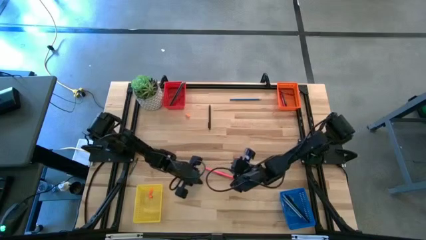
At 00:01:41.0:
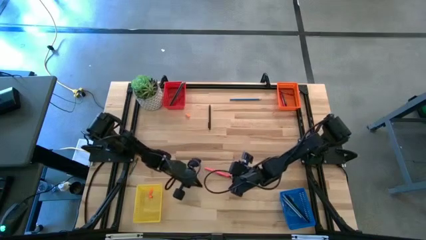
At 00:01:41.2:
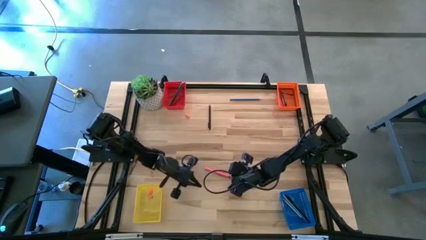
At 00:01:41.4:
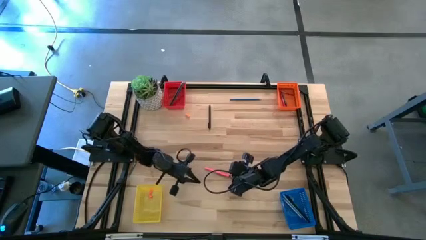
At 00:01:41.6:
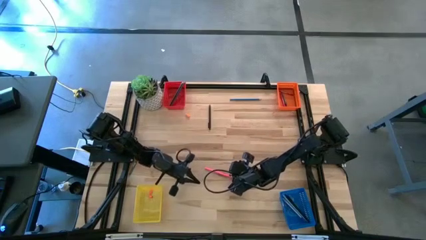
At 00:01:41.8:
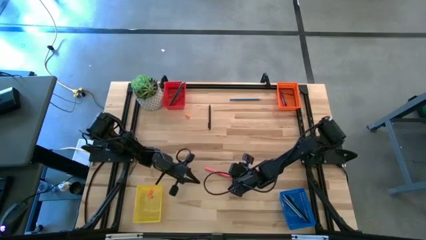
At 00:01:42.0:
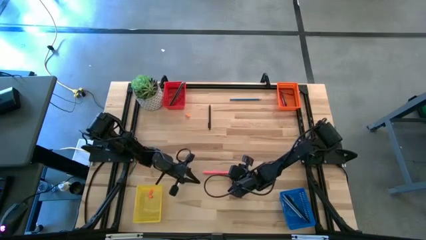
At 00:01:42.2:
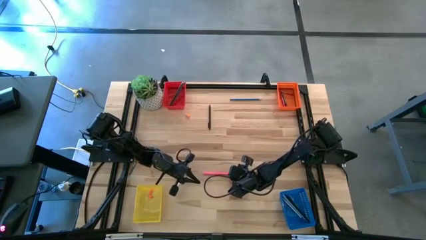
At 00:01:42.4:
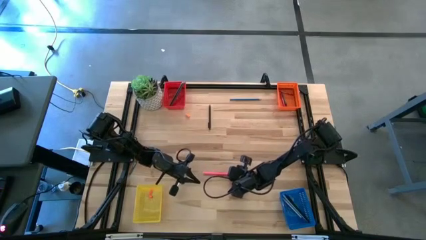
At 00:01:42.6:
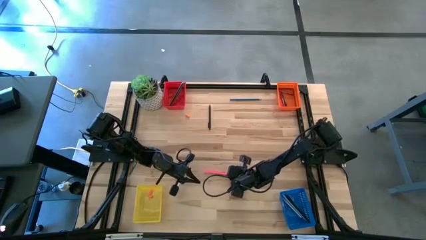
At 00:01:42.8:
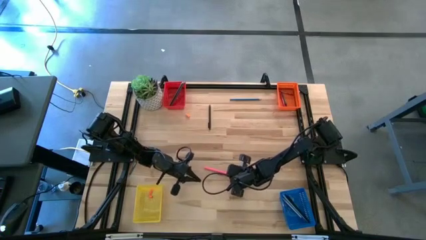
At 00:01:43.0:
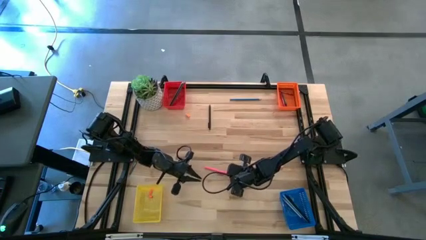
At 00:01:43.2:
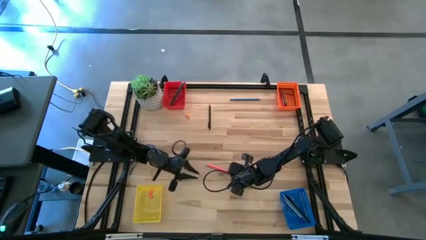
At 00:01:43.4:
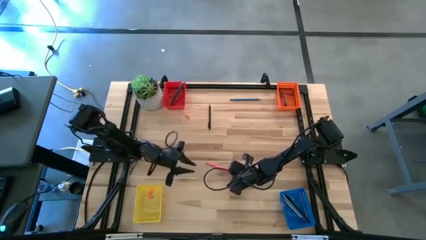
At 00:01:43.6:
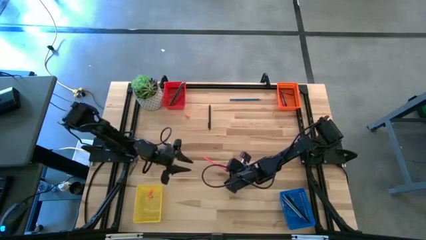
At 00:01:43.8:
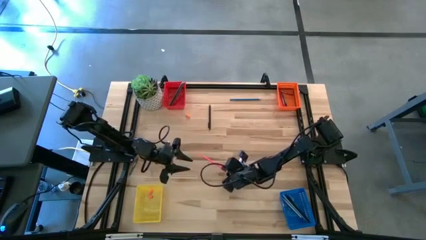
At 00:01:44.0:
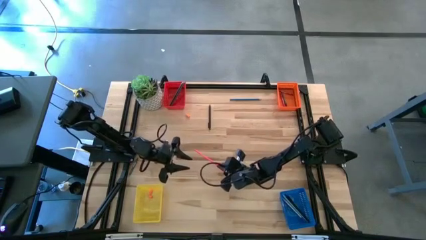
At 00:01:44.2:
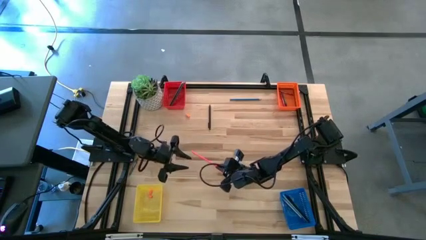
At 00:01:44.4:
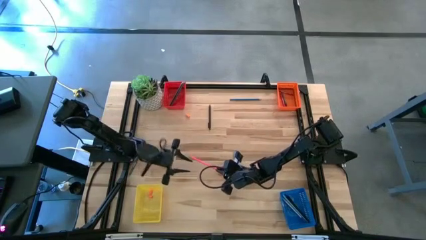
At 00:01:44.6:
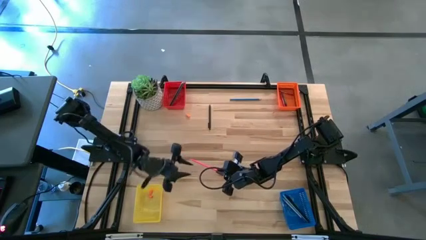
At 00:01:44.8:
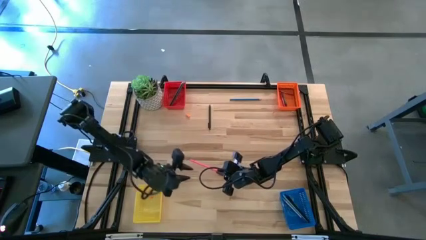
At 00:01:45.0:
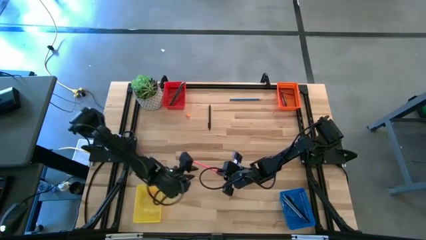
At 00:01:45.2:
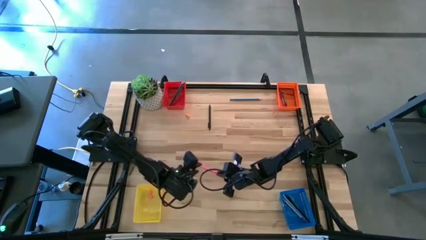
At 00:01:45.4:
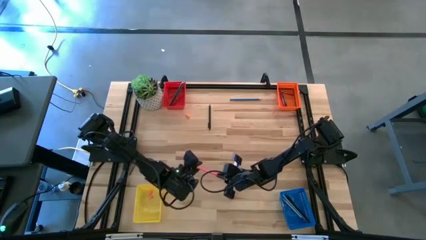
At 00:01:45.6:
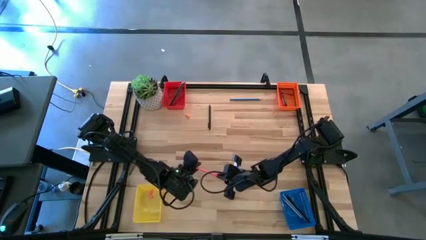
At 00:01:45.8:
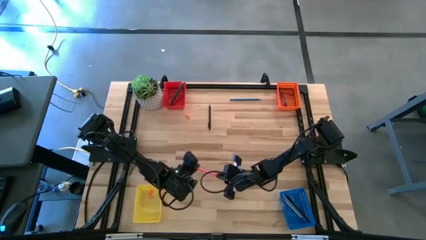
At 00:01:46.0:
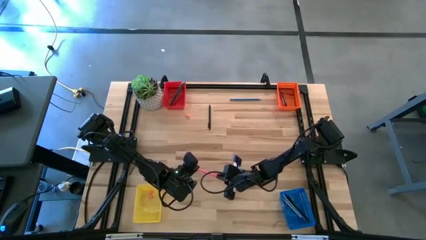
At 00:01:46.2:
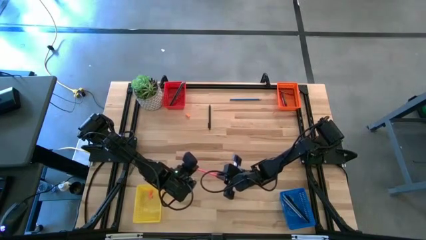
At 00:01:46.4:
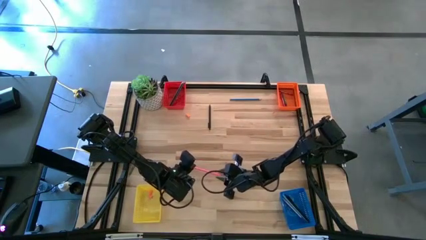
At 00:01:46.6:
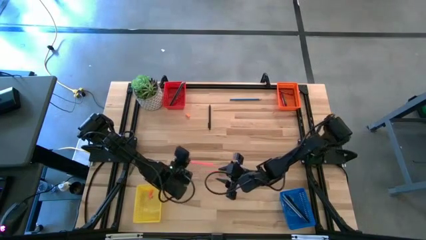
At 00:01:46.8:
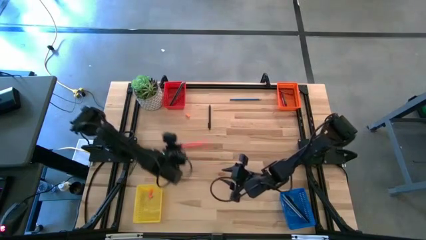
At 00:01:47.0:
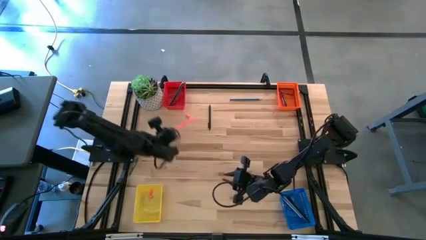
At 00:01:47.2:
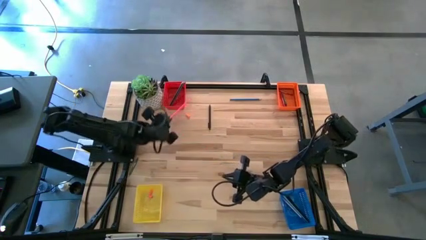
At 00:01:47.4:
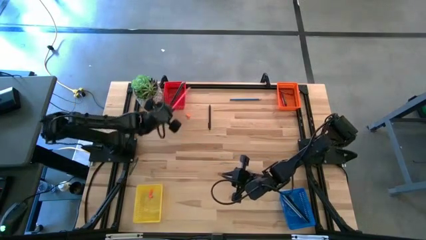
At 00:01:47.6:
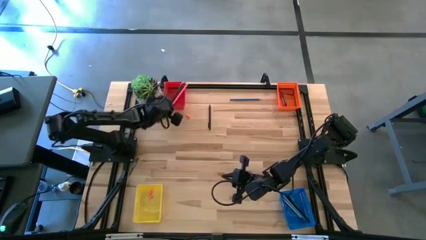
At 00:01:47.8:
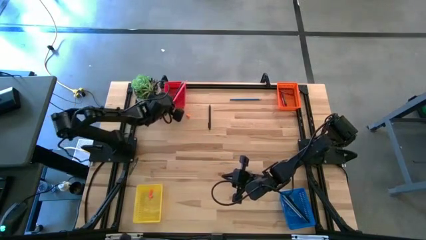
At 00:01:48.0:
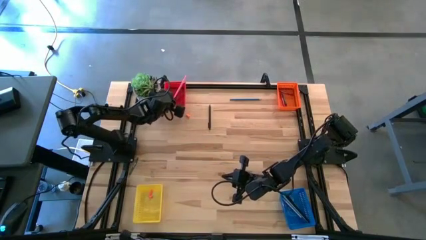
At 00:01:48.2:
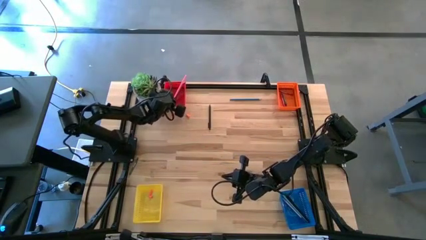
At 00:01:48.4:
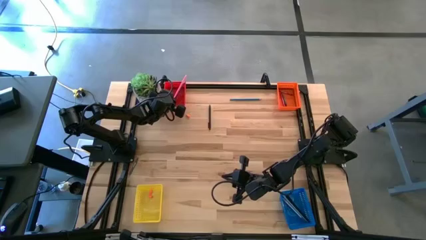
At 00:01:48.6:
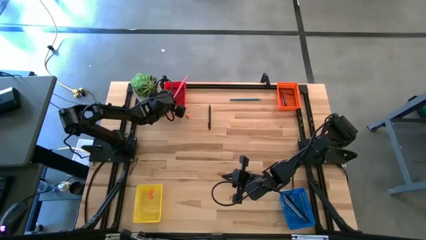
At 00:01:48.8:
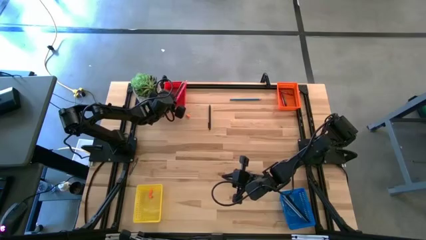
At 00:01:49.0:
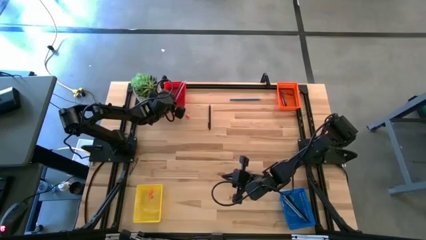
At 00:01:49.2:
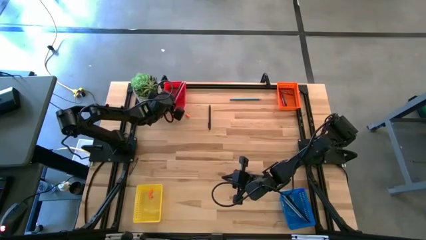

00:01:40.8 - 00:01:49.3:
Task: Sort crayons/erasers/pens/pencils in bins
Put the pink pencil into the red bin

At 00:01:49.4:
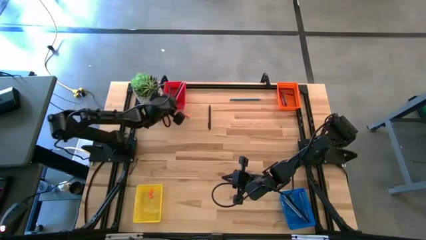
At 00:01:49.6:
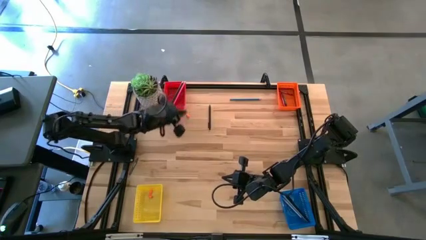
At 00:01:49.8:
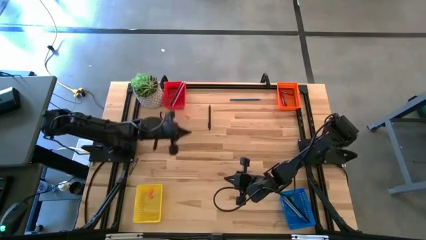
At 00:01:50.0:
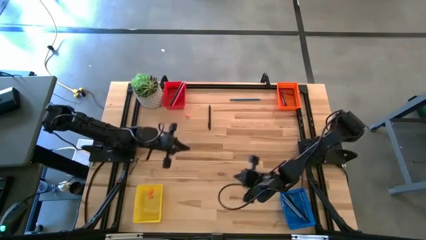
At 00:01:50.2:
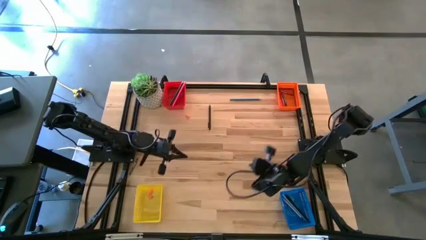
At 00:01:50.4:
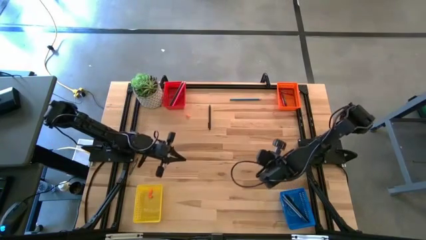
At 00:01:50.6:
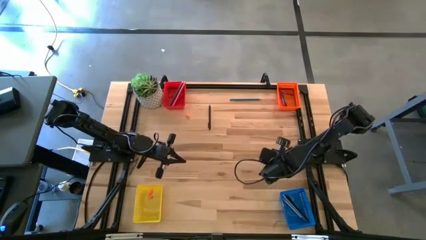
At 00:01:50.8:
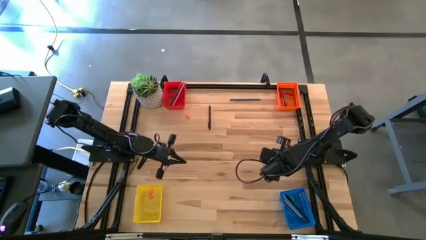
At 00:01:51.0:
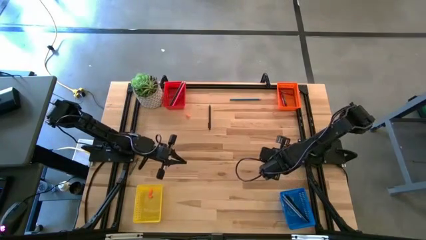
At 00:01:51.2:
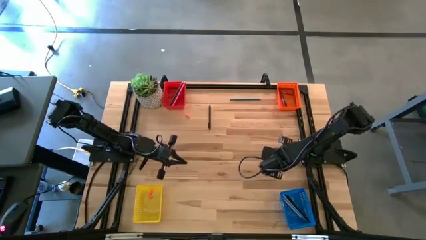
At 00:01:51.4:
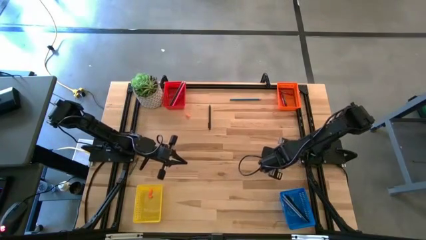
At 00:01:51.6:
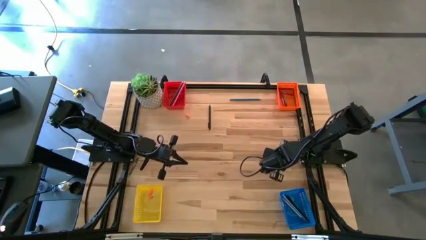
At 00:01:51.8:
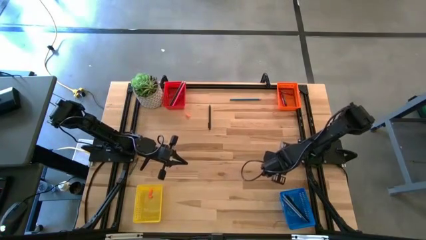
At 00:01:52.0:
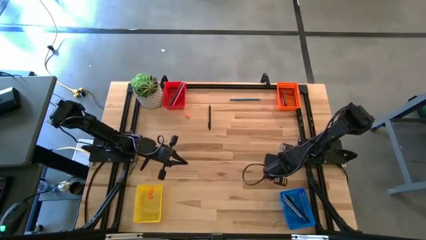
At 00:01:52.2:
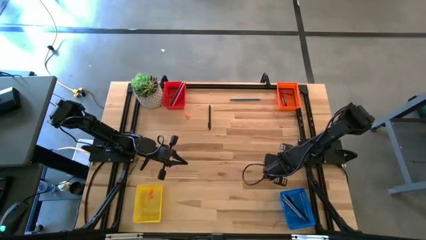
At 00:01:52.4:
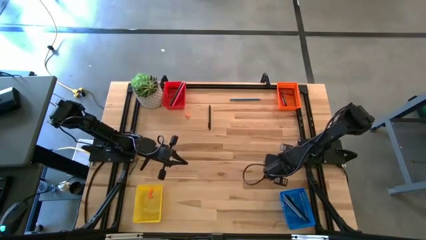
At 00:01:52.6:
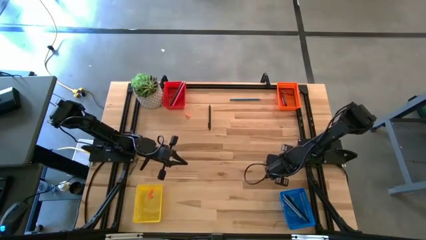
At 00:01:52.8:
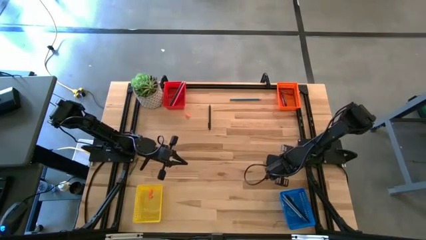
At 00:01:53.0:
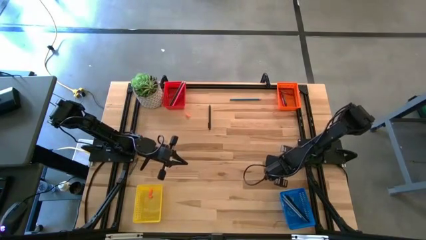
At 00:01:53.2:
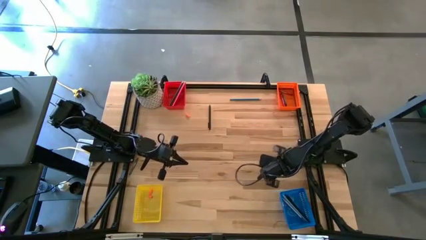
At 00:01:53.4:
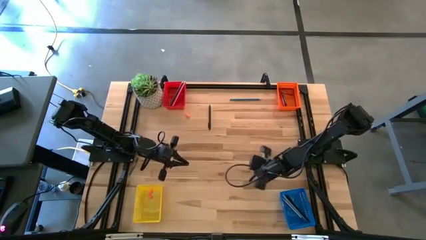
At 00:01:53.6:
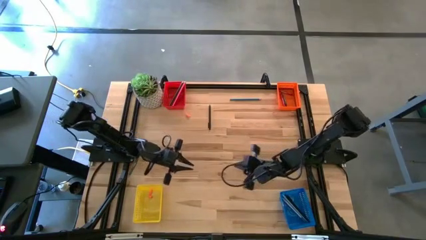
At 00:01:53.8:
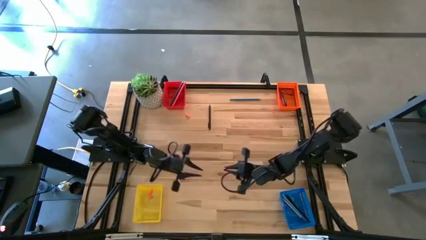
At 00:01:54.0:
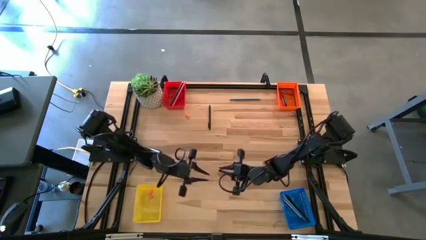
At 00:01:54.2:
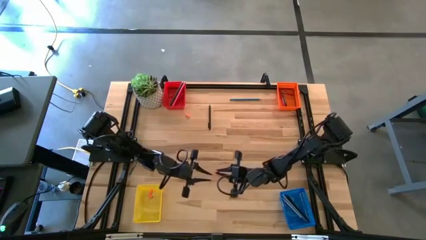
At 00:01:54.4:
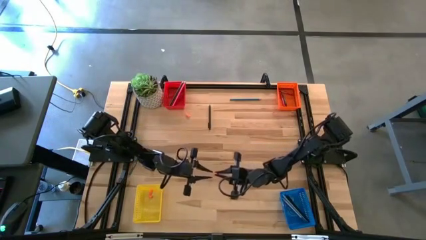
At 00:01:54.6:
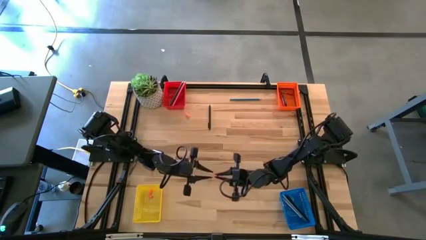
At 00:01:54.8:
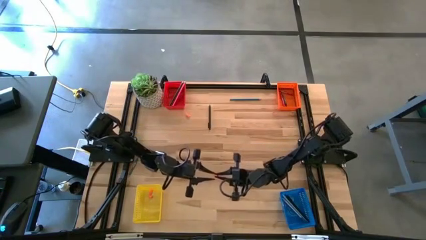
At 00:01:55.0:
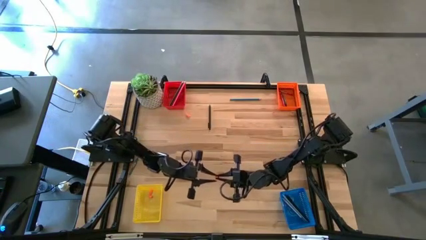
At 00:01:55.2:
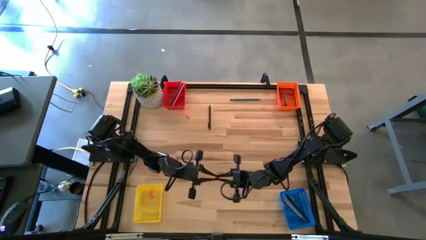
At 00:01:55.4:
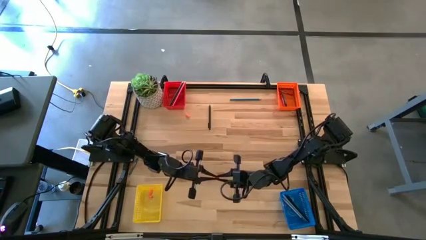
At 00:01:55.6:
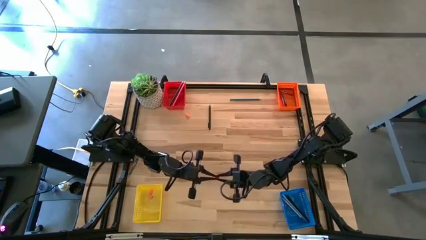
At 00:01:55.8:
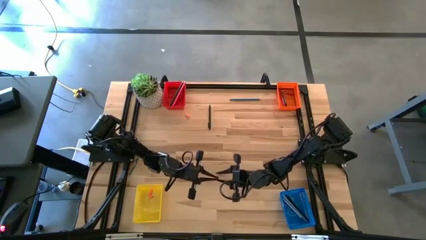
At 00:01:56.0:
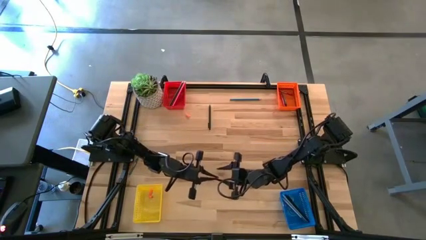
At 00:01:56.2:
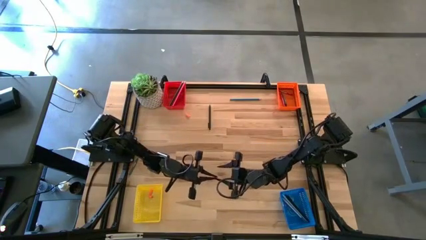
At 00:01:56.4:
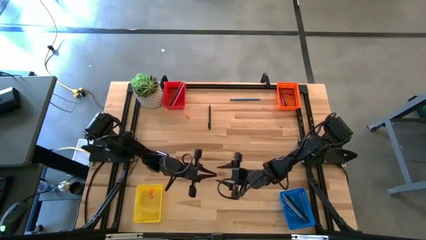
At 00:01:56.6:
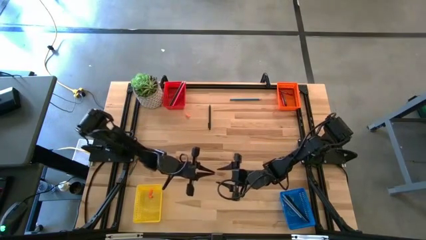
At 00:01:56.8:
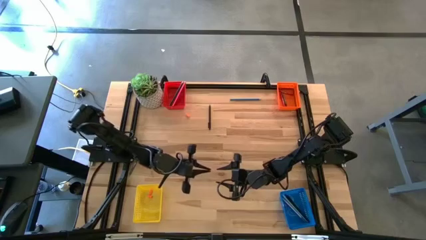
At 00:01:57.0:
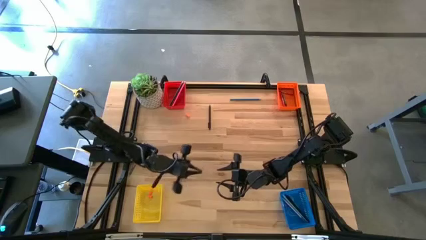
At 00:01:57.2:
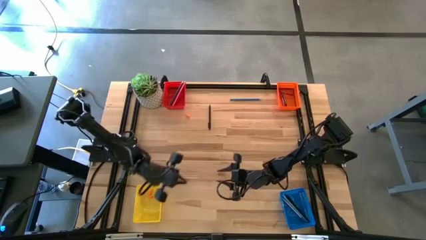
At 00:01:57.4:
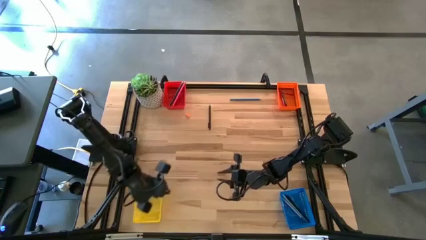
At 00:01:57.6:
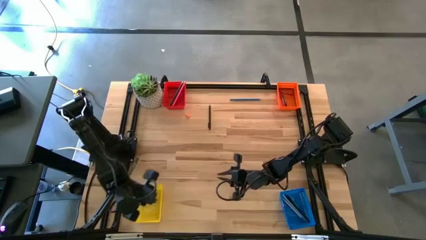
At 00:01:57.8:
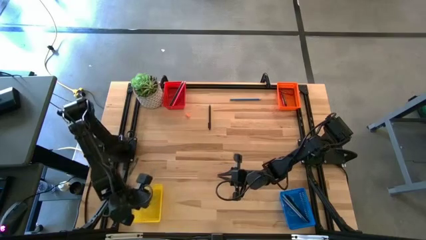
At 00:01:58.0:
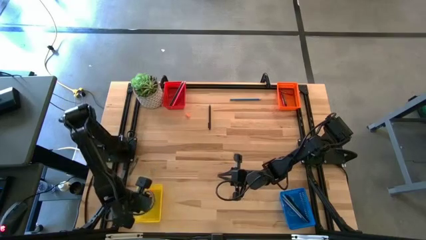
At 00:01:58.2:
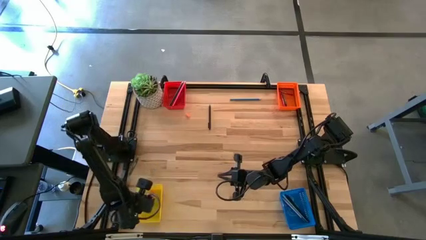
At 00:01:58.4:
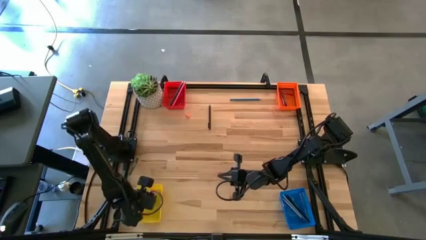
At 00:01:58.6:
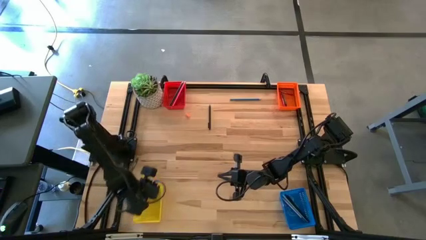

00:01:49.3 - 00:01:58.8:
Put the orange pencil eraser cap into the yellow bin
